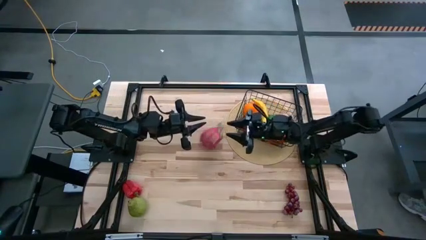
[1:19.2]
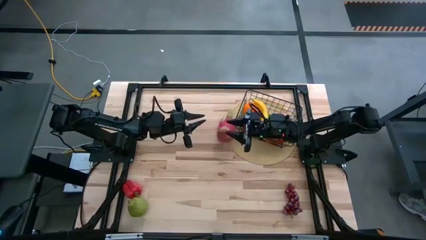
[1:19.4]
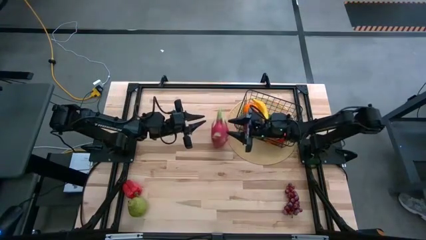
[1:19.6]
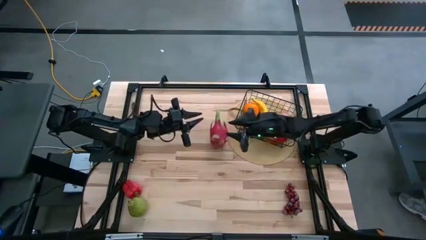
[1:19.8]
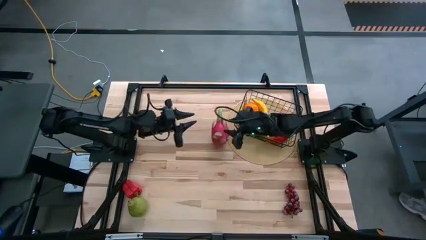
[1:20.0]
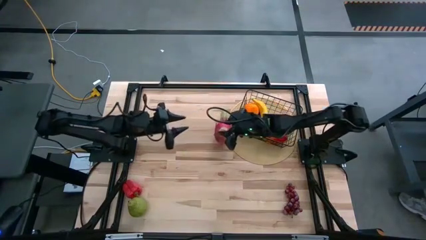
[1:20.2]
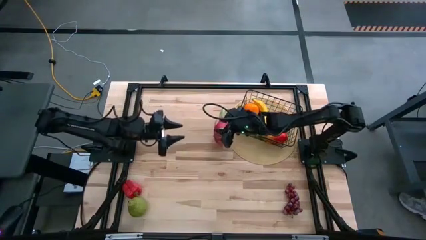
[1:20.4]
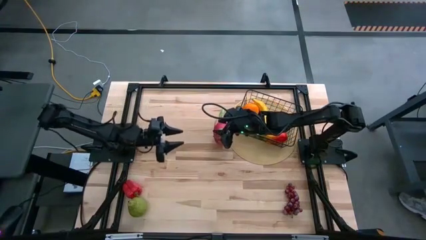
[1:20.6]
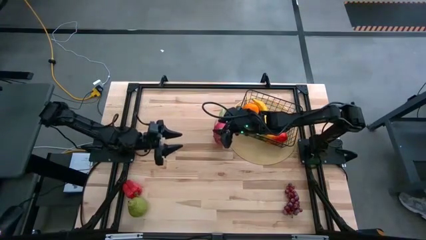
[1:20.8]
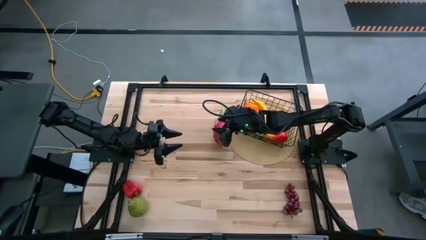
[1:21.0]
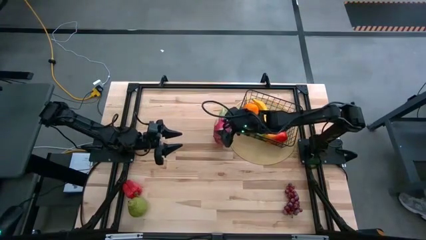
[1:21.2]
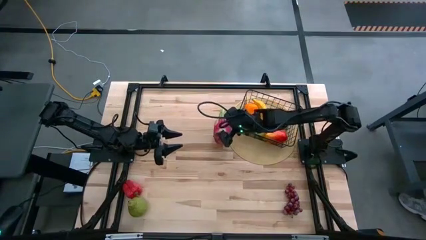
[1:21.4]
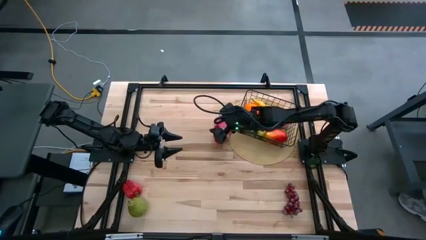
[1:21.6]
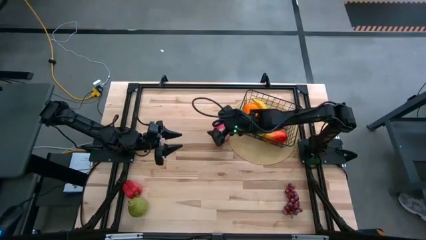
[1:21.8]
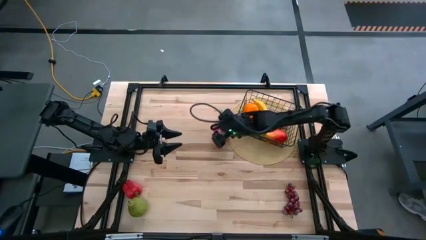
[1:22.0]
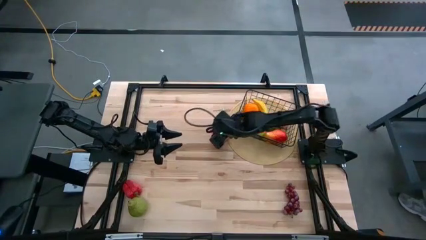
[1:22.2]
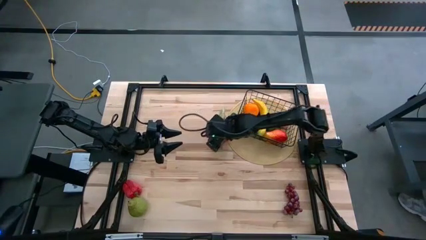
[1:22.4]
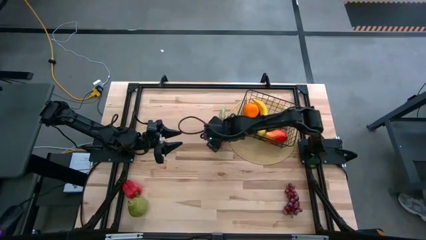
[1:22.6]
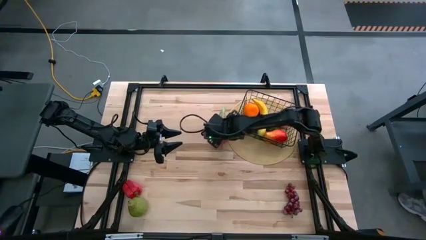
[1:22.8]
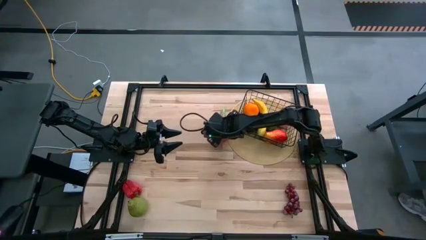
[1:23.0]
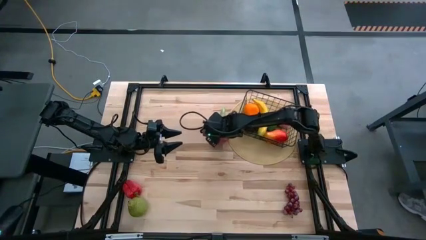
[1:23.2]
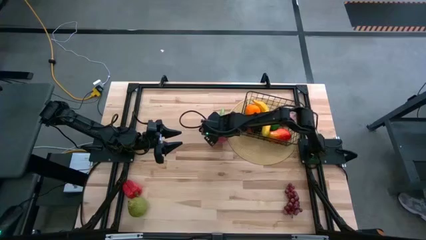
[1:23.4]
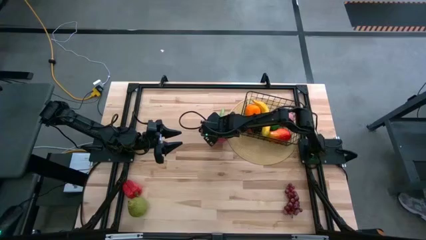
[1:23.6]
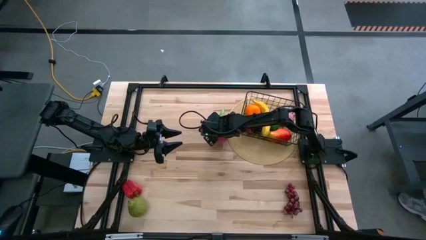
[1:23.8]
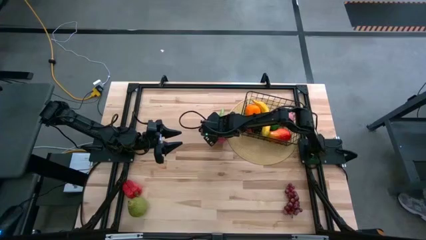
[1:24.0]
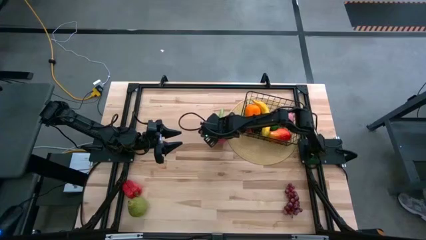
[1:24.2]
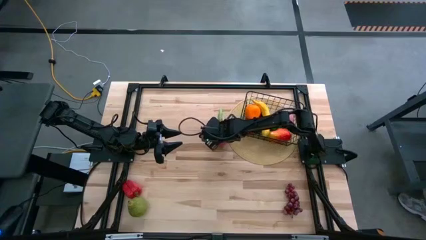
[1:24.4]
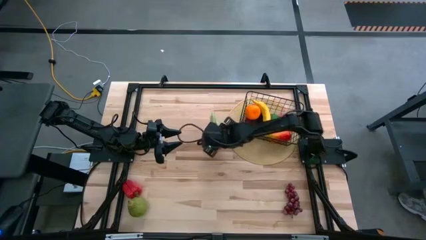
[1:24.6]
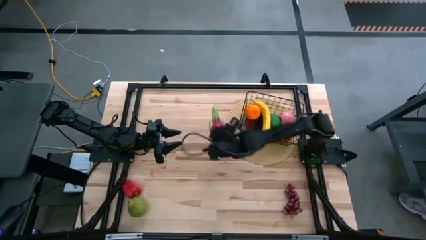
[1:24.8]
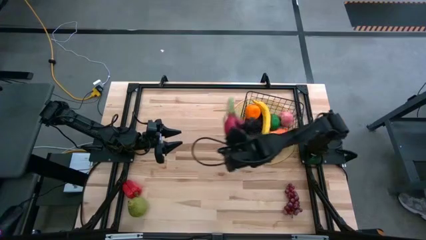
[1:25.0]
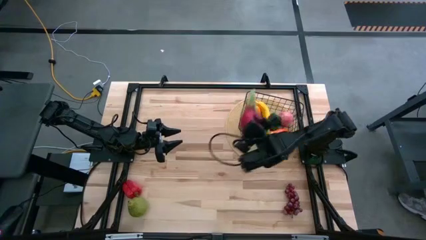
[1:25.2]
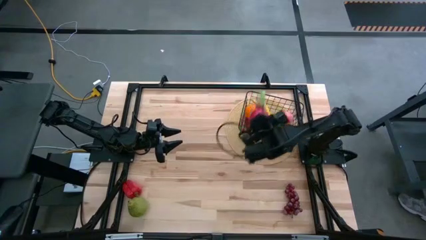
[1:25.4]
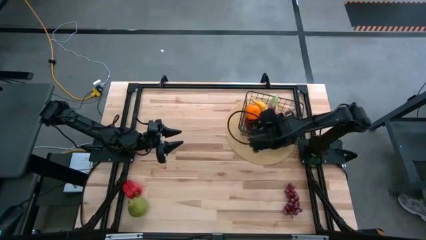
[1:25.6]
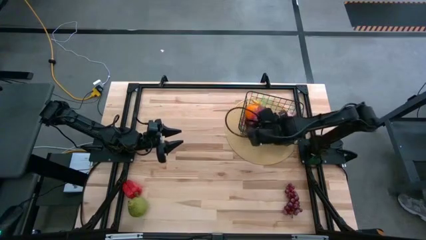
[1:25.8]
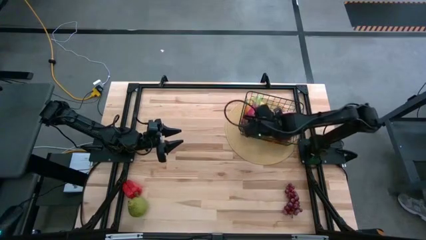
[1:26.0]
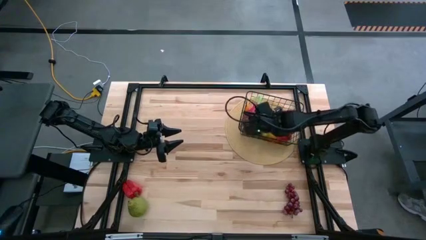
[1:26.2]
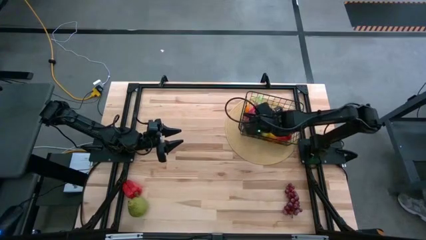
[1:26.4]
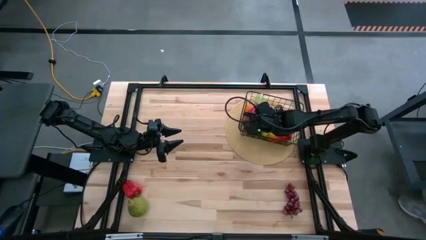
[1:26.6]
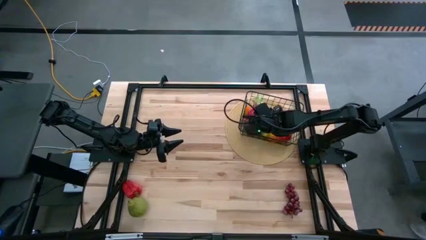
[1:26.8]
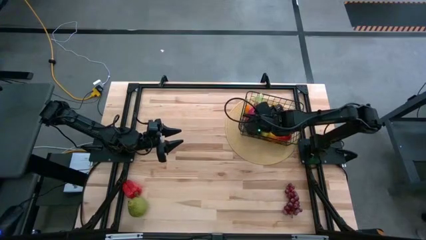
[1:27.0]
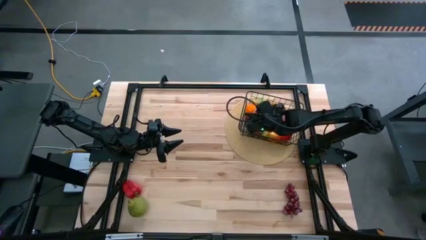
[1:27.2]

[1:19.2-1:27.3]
Task: Build produce basket
Put the dragonfruit into the wire basket

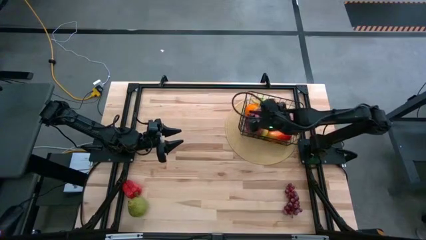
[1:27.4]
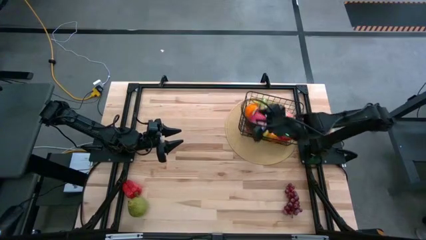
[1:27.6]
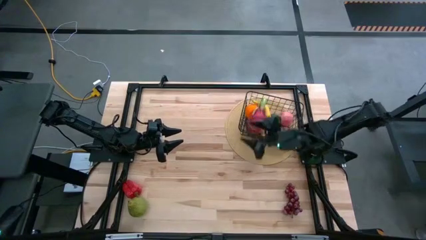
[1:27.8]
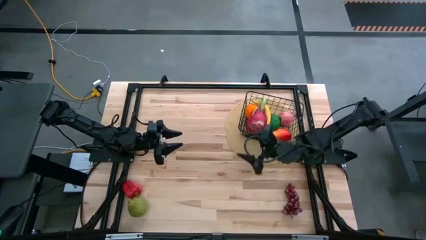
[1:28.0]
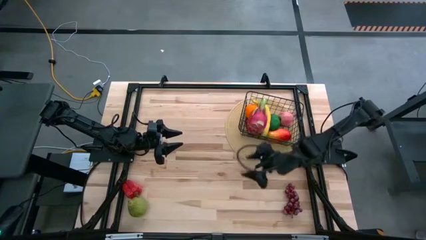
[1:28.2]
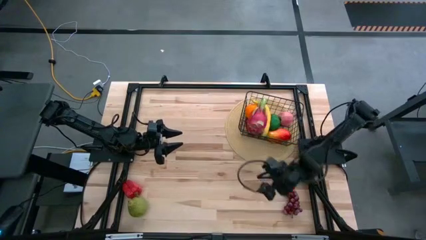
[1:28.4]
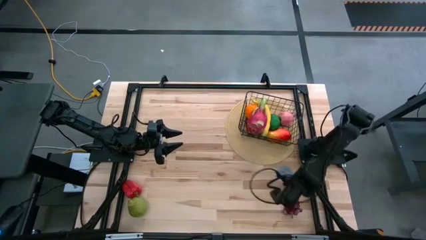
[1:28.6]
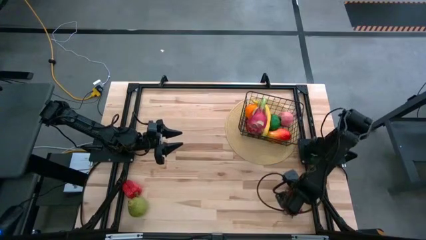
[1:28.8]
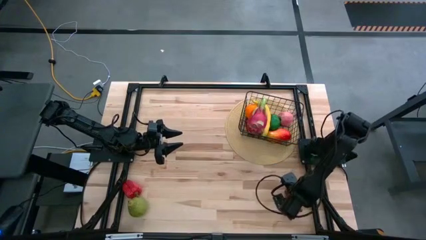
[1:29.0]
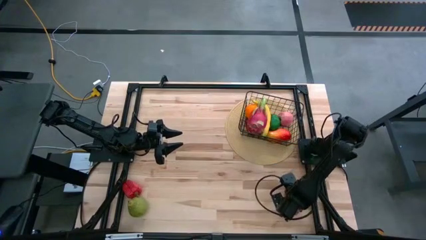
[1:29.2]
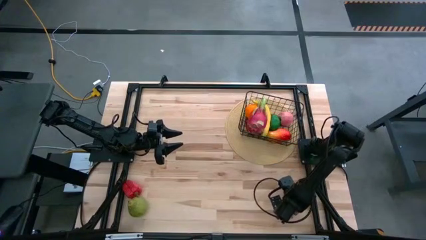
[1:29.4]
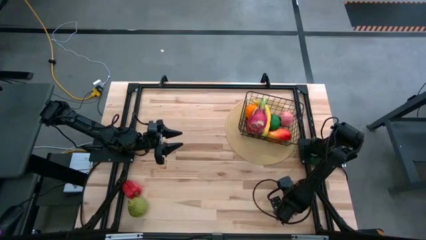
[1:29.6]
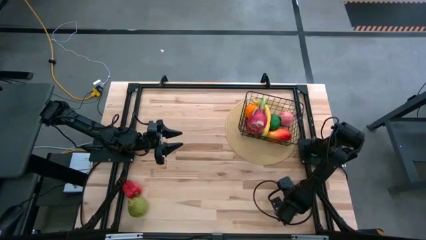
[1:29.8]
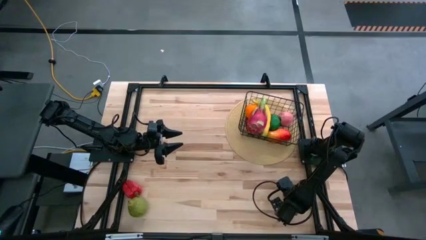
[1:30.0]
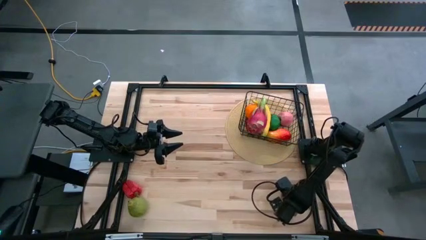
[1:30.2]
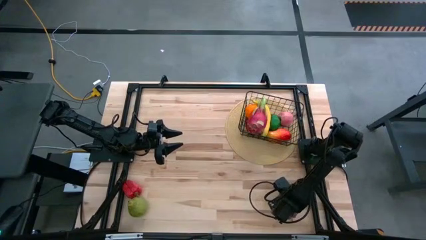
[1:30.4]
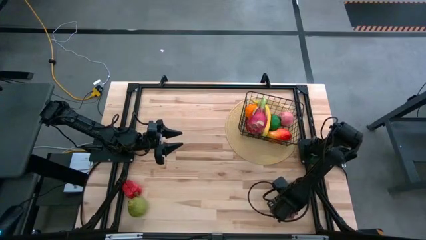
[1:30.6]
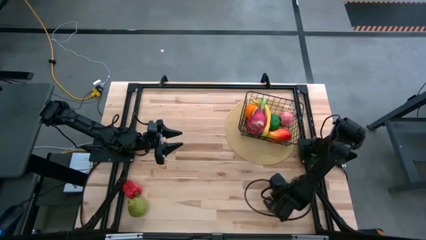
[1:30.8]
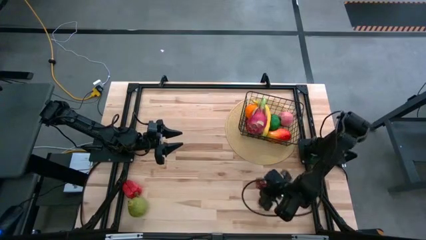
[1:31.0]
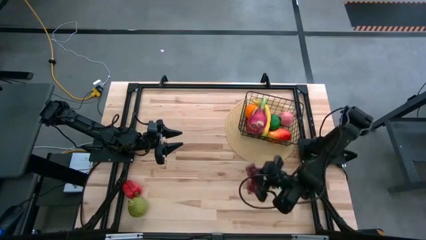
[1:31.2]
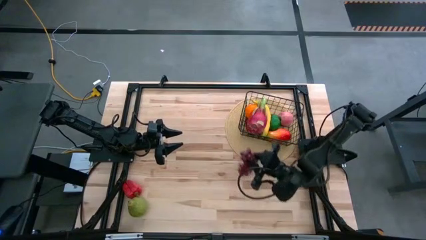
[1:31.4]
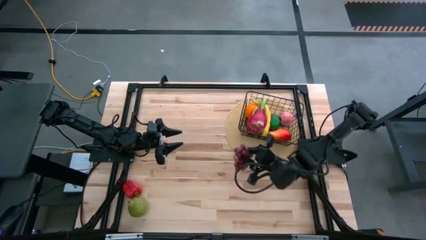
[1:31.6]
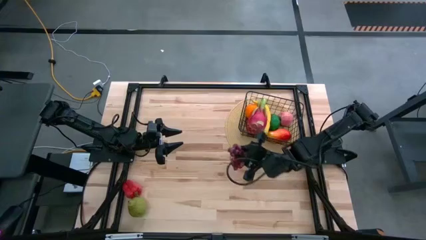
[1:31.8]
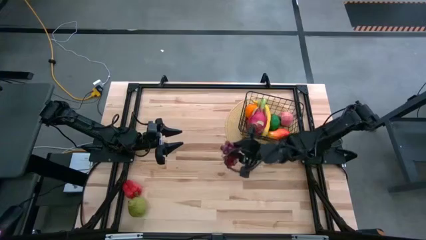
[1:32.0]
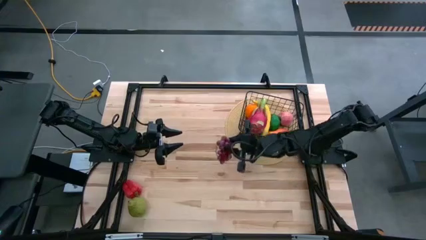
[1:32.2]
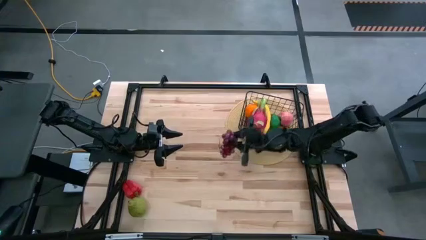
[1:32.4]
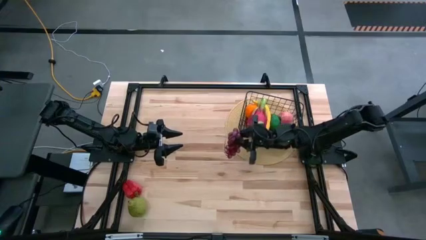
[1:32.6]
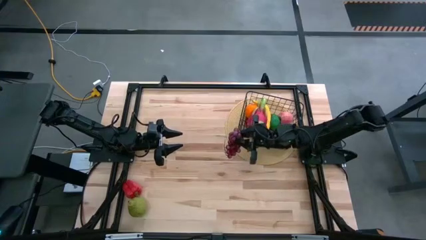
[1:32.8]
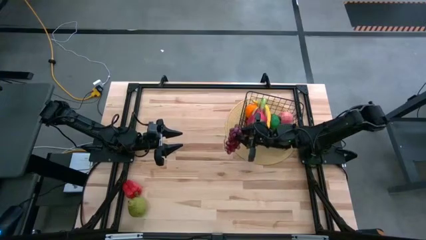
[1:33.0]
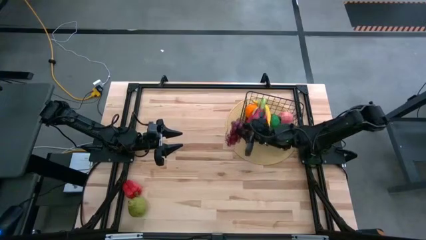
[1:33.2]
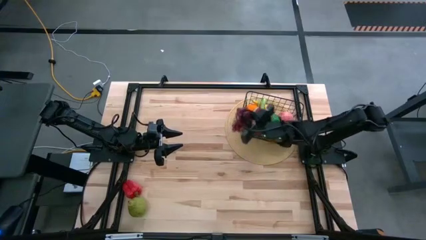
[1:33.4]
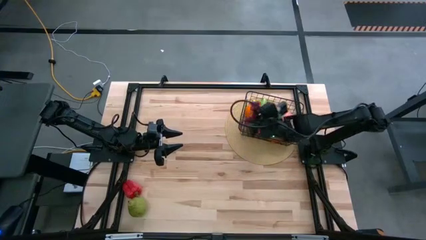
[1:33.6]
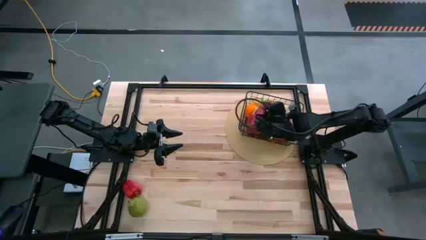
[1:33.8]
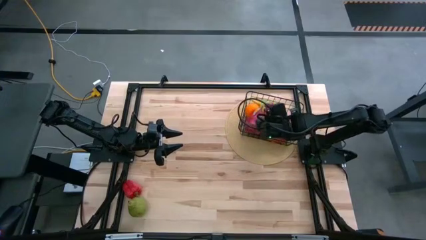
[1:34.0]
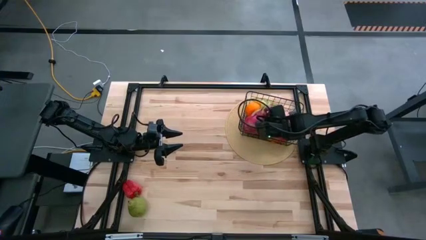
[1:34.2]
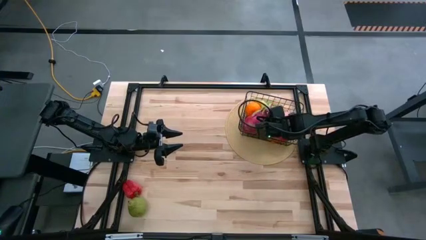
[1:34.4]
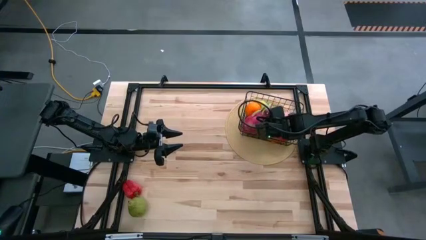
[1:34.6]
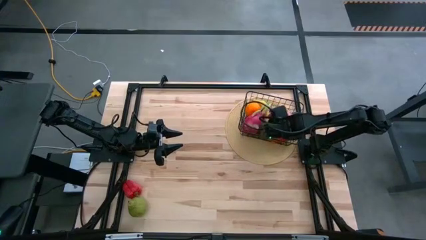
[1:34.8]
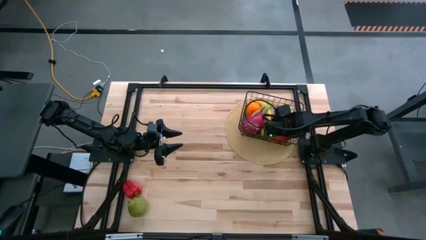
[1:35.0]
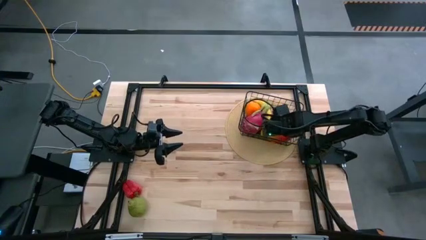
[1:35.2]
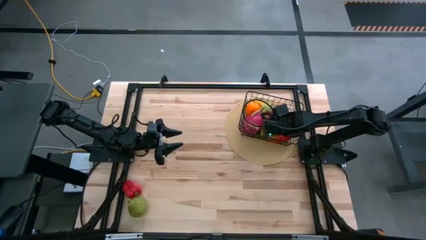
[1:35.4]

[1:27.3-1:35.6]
Put the red grapes into the wire basket
